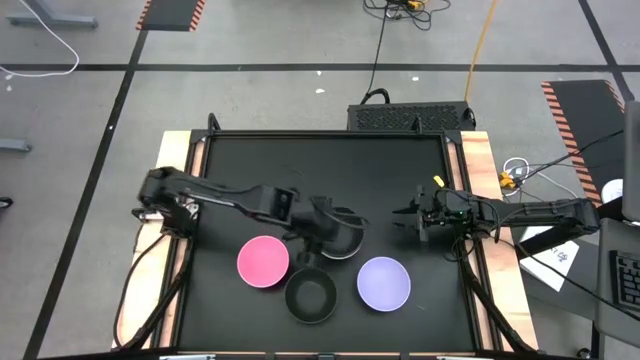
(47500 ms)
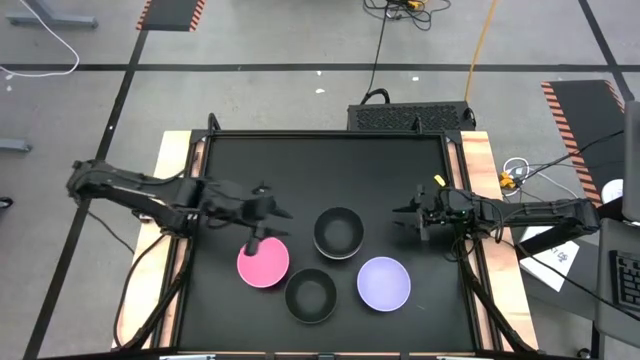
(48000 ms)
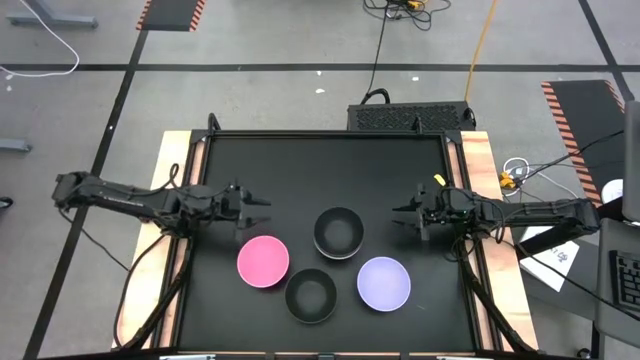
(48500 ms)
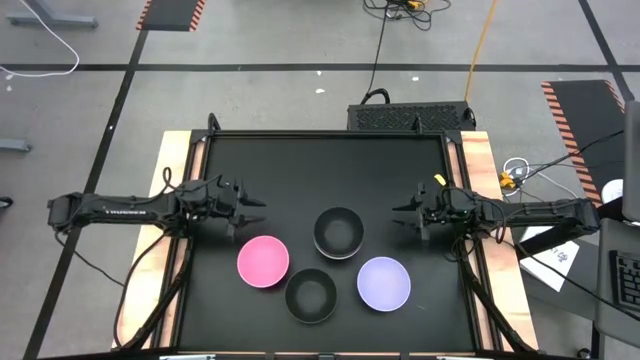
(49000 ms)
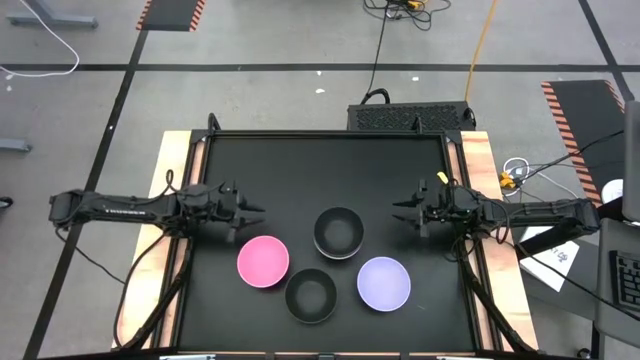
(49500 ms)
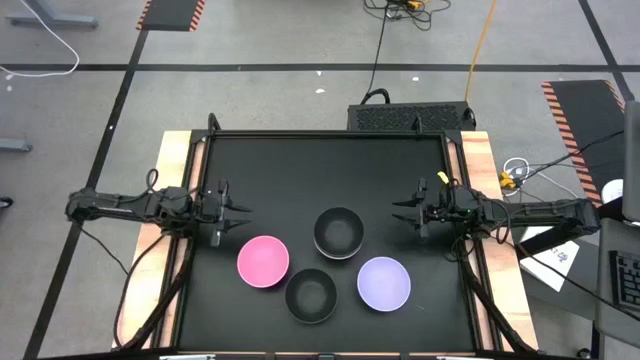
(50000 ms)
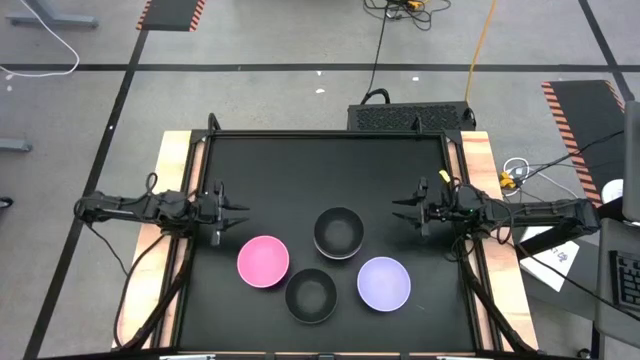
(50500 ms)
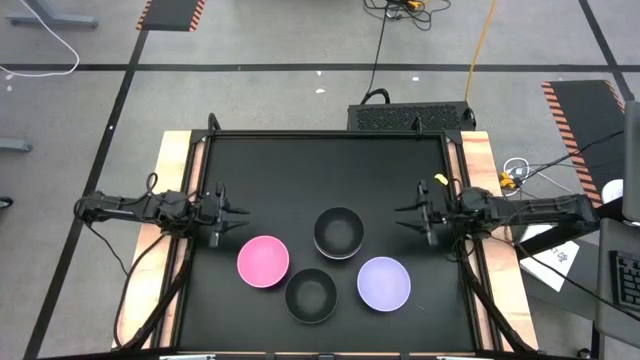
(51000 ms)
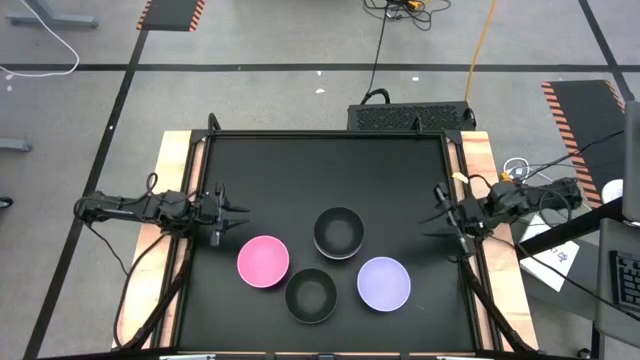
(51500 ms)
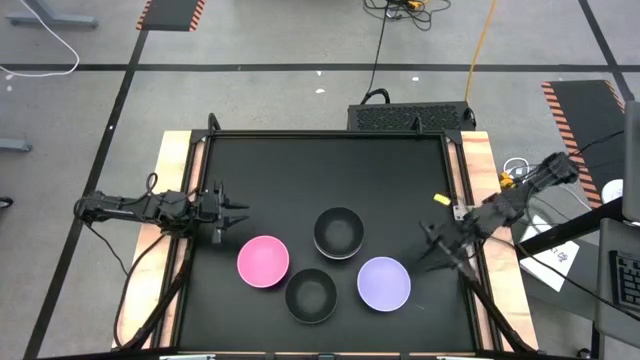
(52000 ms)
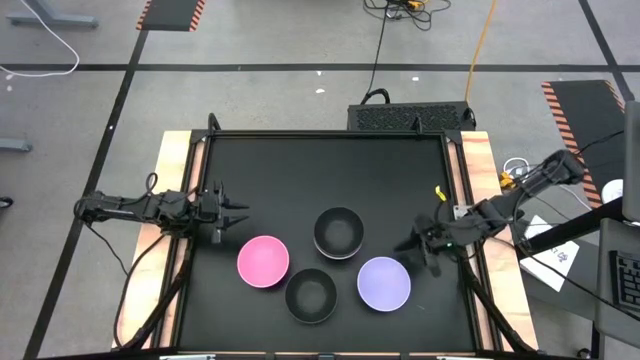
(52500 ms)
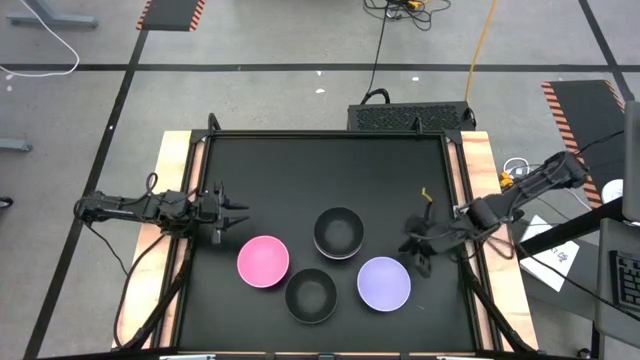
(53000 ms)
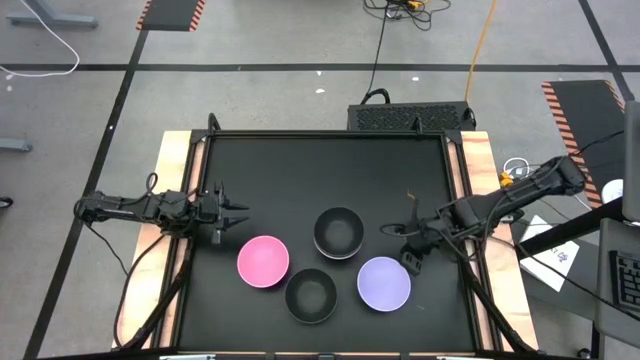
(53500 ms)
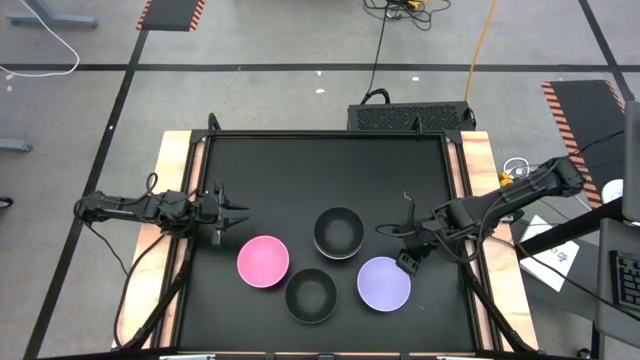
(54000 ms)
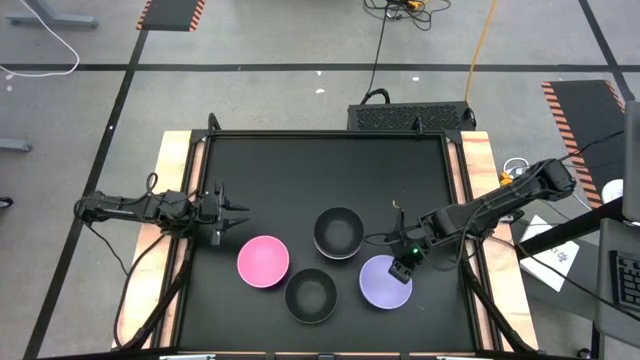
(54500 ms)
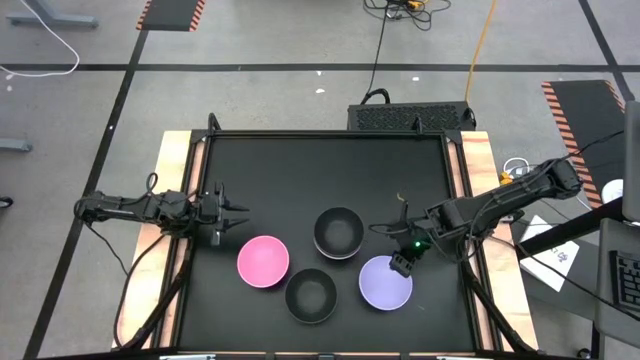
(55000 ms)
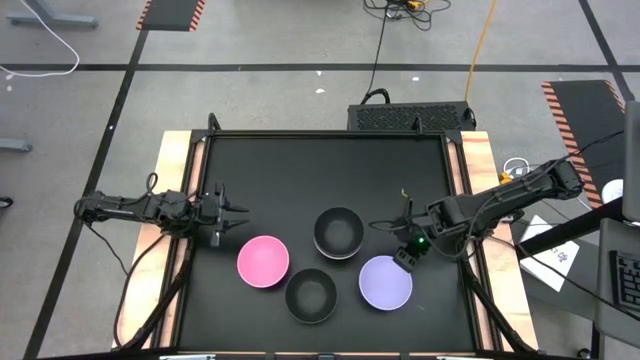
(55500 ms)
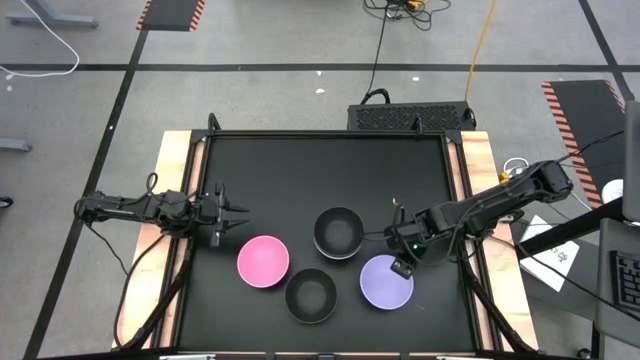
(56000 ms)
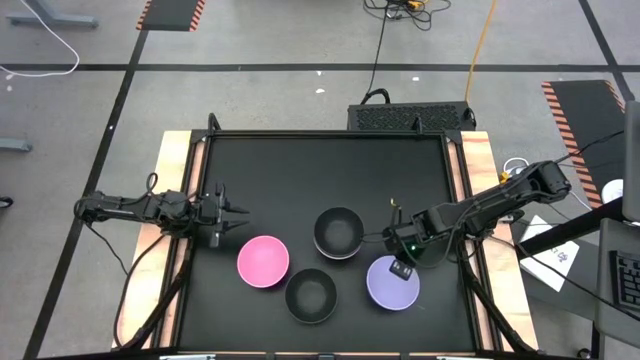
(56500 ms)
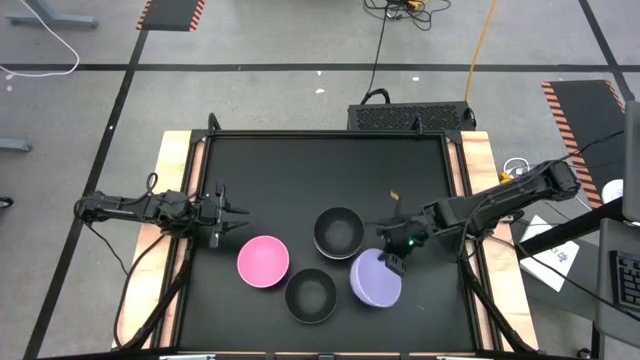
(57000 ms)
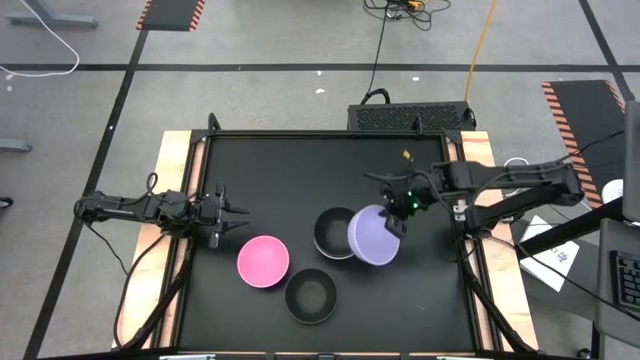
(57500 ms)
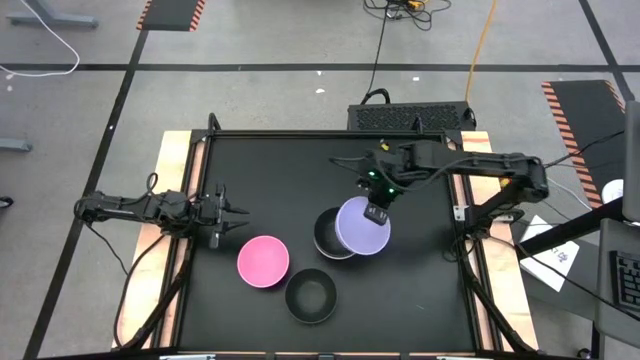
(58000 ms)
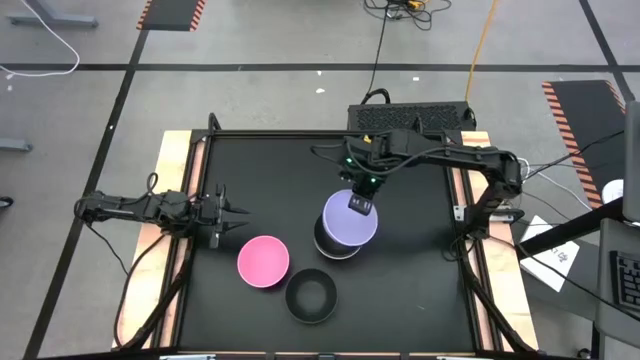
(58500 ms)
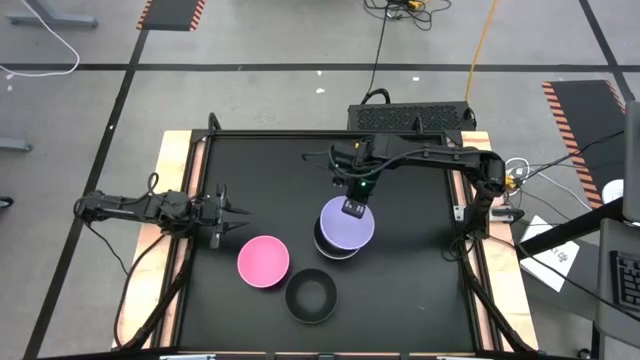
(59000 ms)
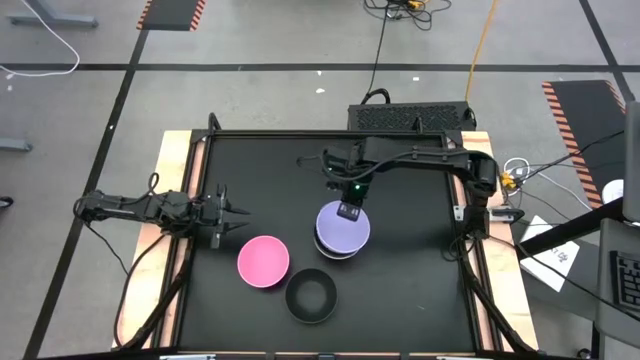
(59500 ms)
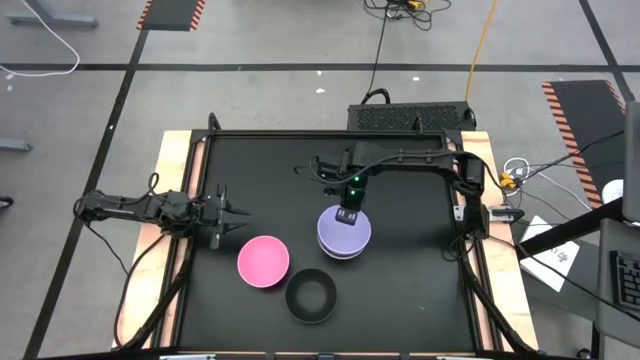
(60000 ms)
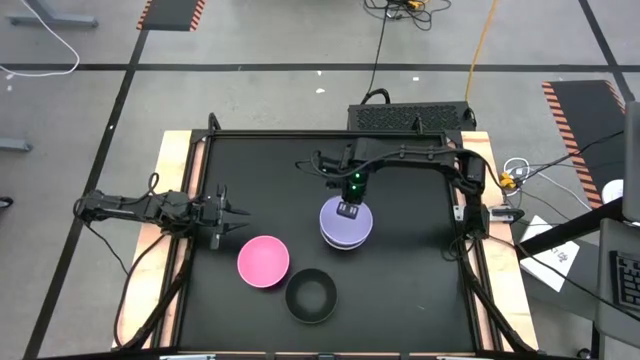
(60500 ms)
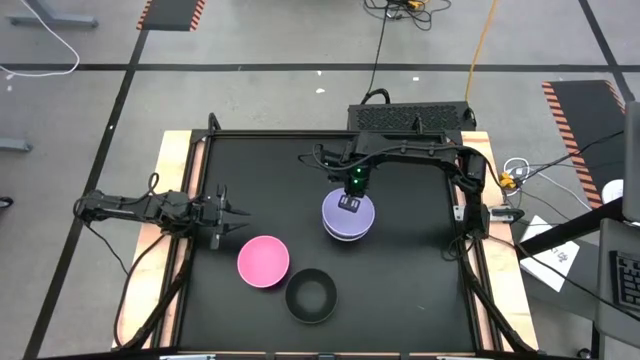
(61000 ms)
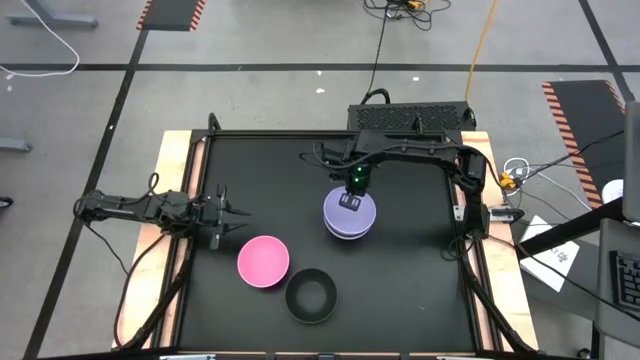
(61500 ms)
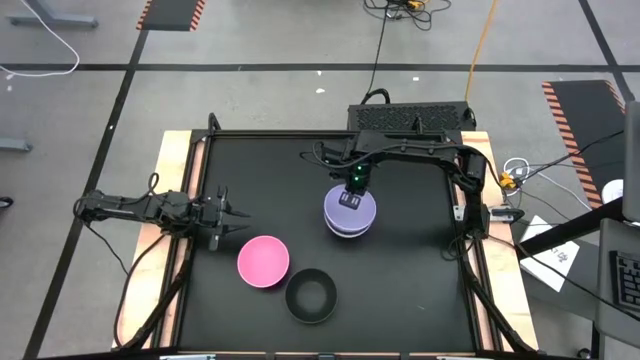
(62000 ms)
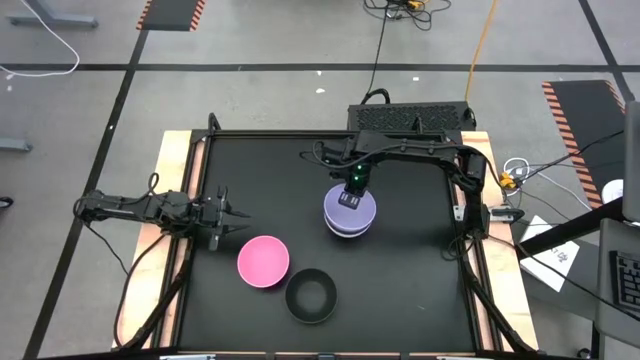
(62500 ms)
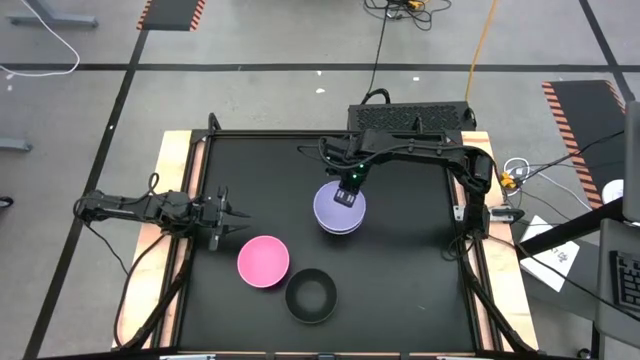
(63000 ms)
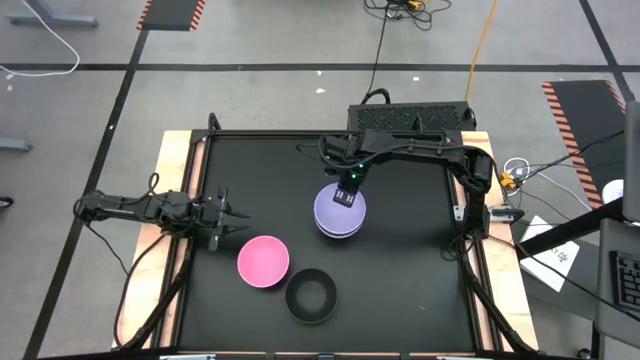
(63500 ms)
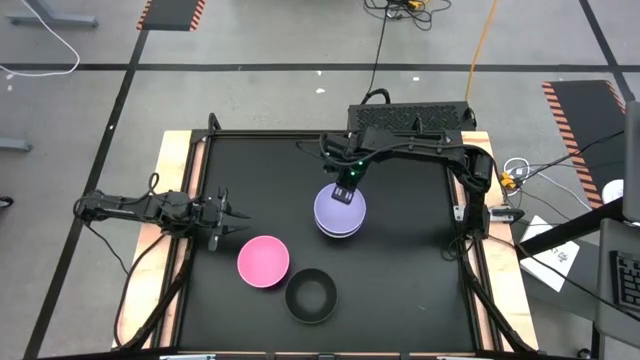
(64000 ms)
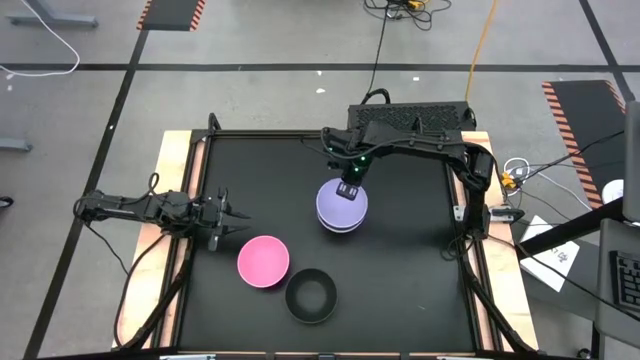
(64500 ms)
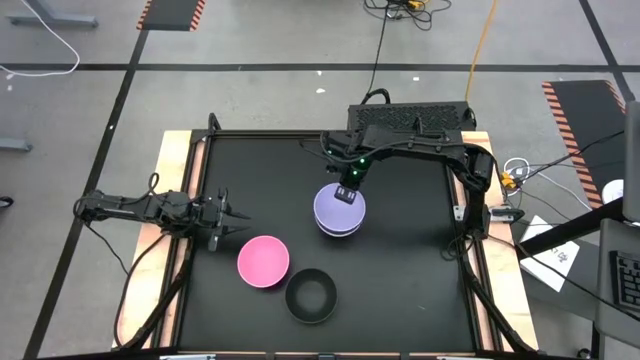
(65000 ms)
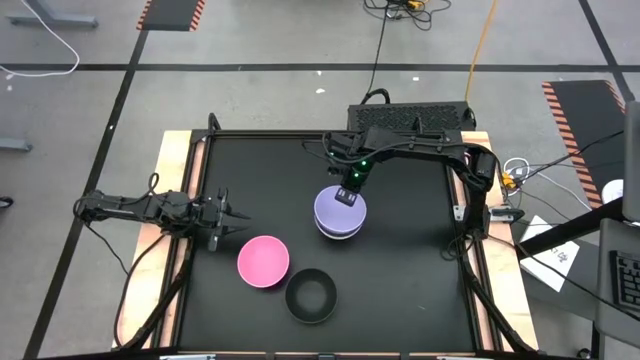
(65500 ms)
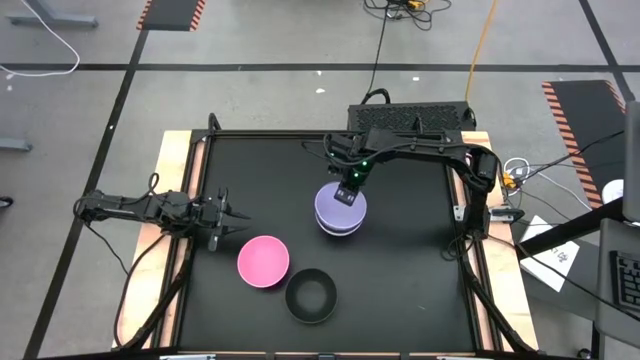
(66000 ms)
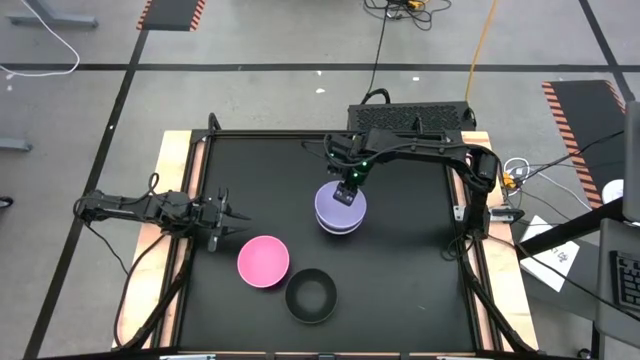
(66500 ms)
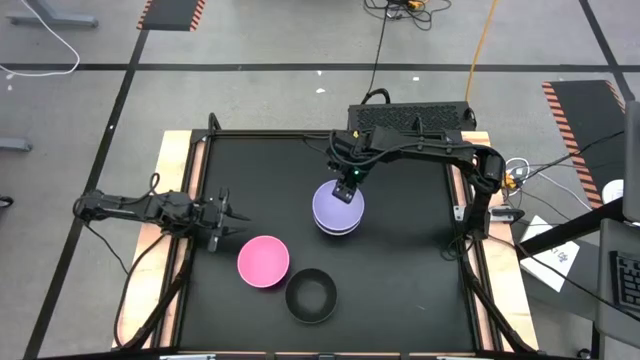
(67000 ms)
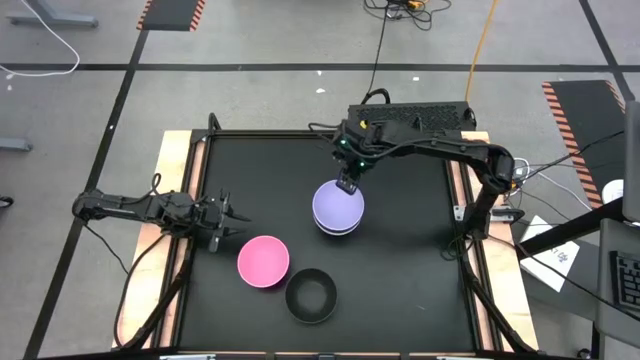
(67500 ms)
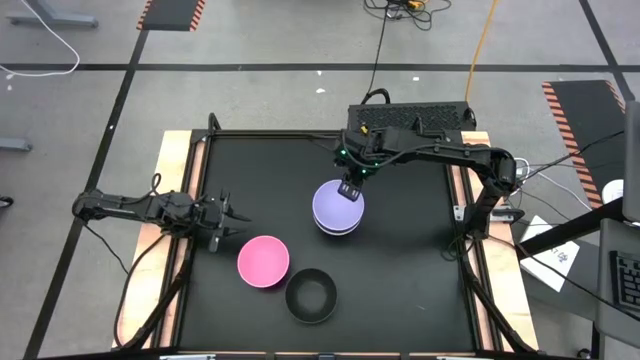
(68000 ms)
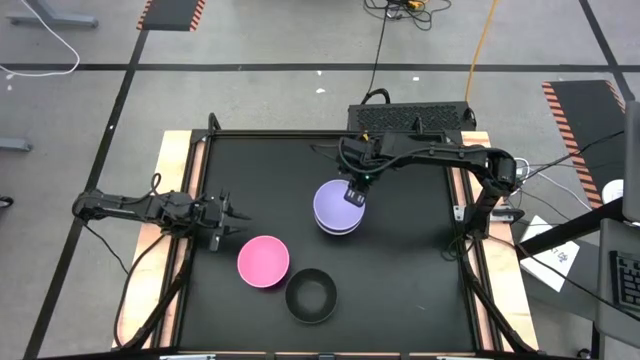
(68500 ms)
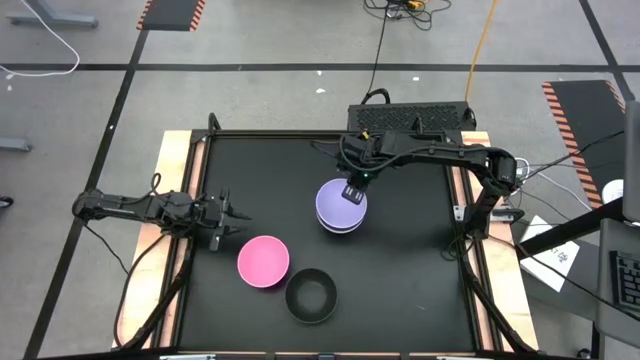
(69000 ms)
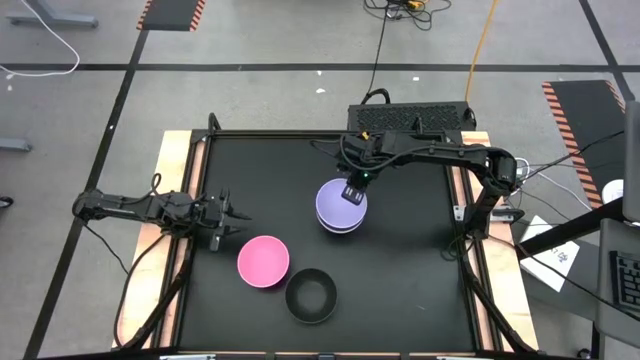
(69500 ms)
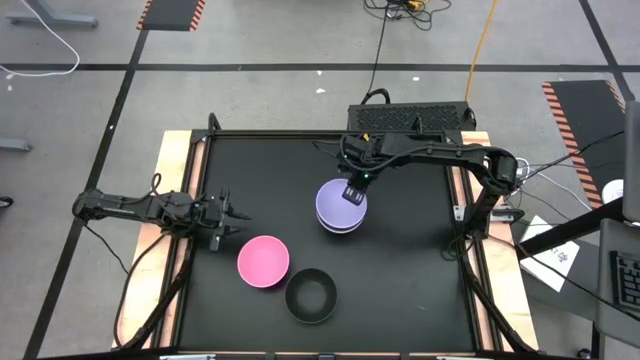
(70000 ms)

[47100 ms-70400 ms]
Task: Nest bowls inside each other
Stack the purple bowl on top of the black bowl
